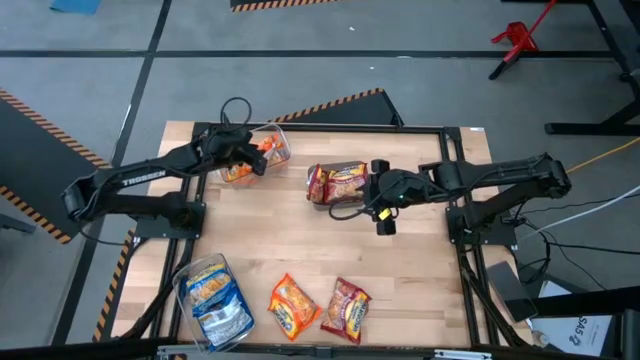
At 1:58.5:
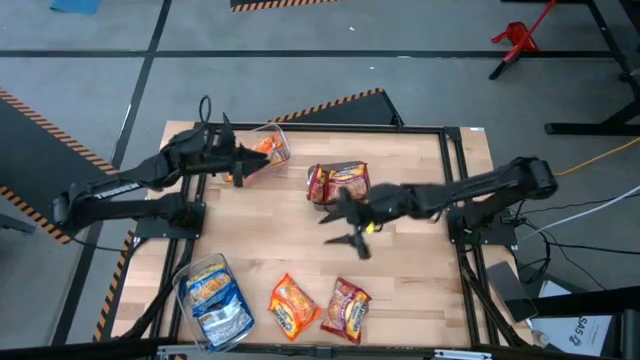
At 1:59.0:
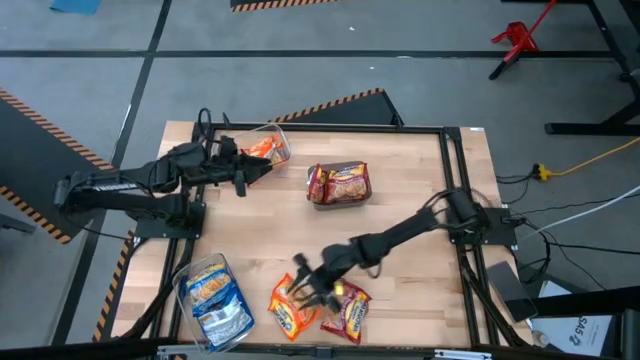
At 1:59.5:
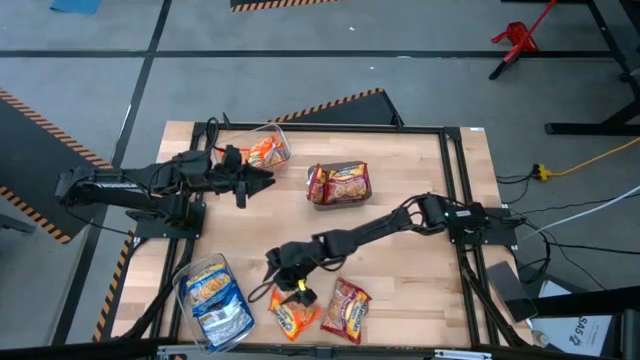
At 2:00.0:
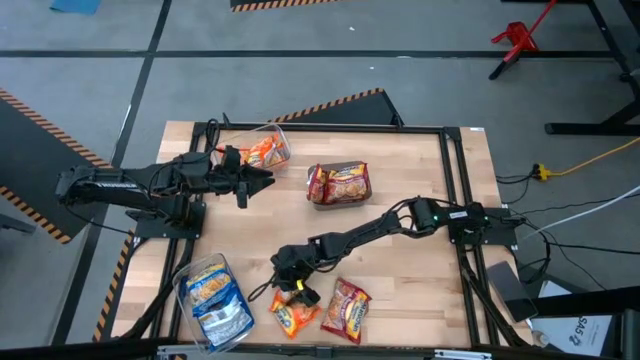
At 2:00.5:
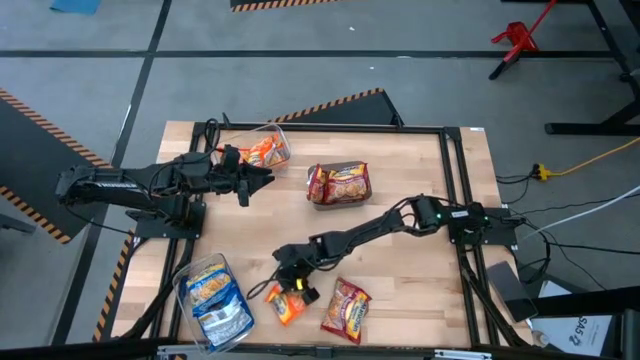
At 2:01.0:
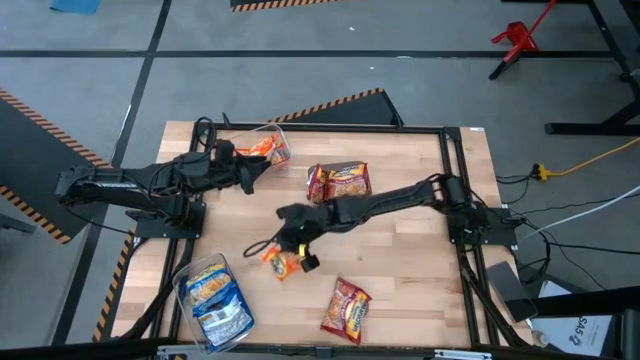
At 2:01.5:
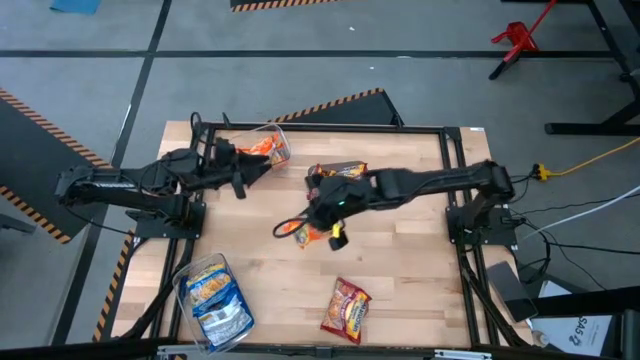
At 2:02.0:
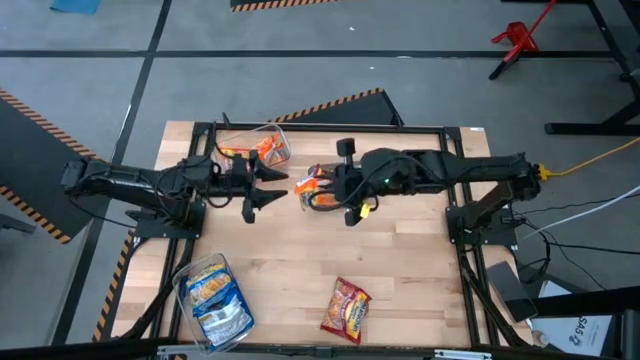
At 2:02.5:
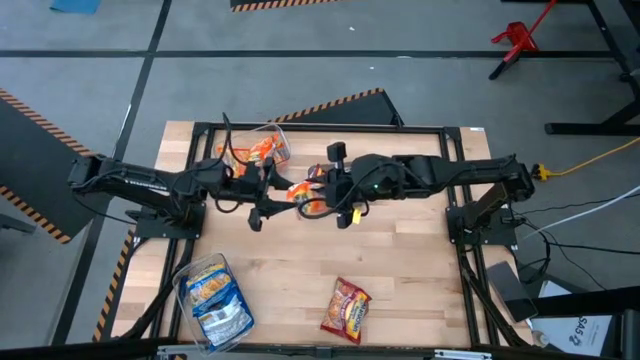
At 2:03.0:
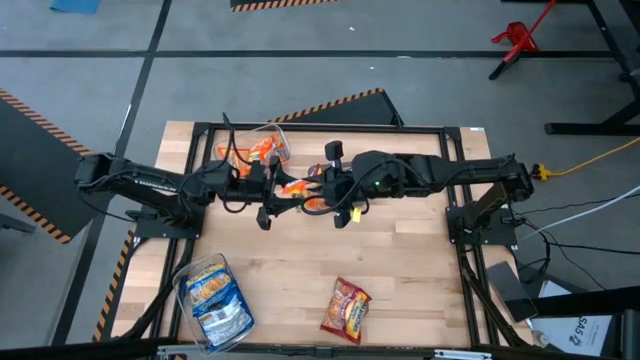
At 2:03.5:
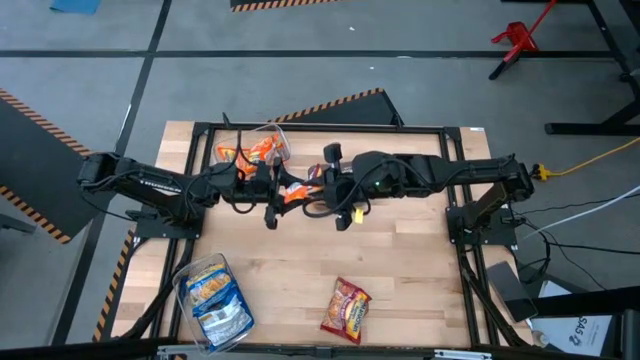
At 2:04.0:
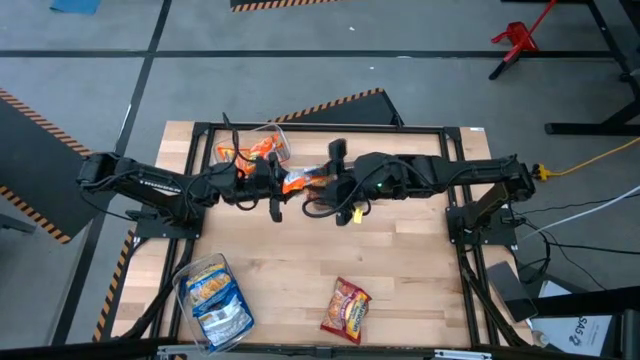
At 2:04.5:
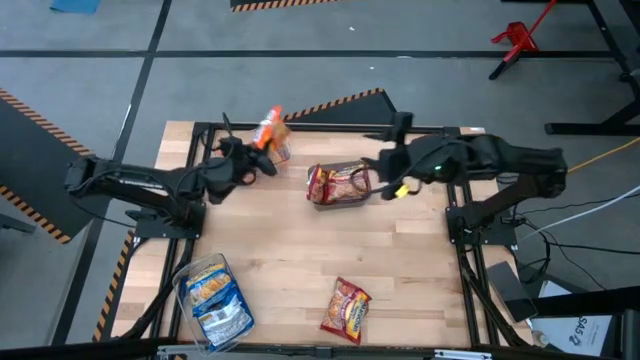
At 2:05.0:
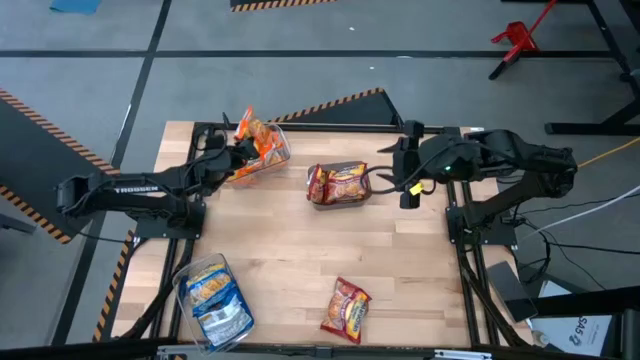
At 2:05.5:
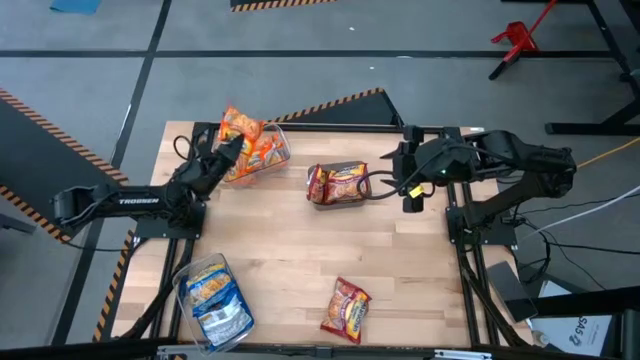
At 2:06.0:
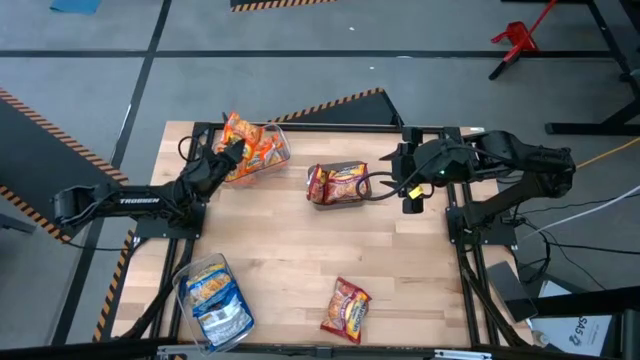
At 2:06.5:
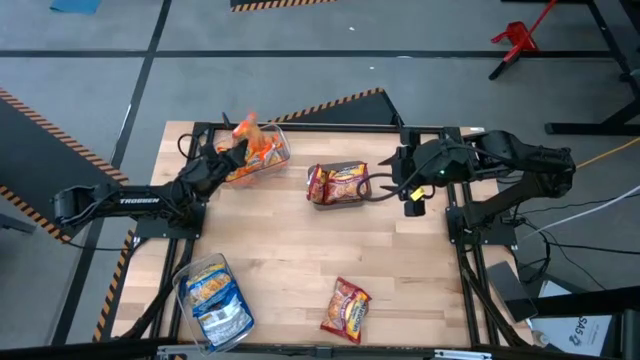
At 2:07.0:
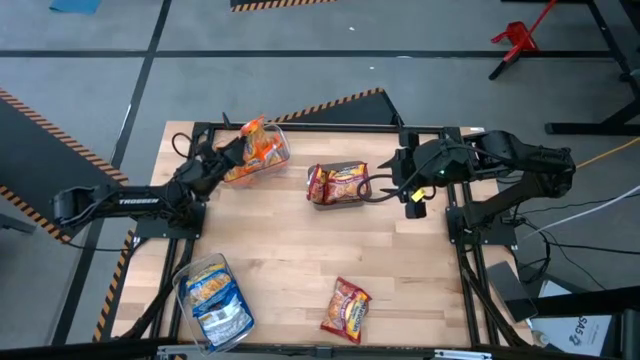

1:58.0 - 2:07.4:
Task: Sort Maruchan noodles
Put the orange noodle pack into the top transparent bin

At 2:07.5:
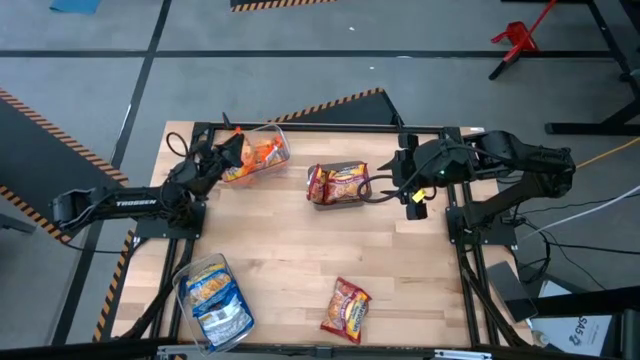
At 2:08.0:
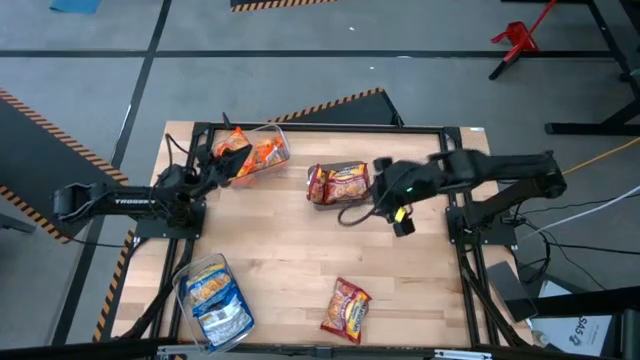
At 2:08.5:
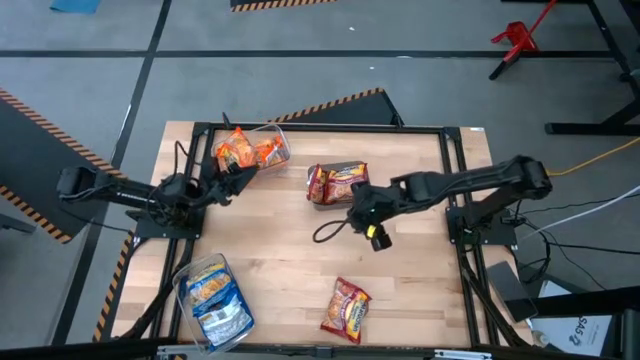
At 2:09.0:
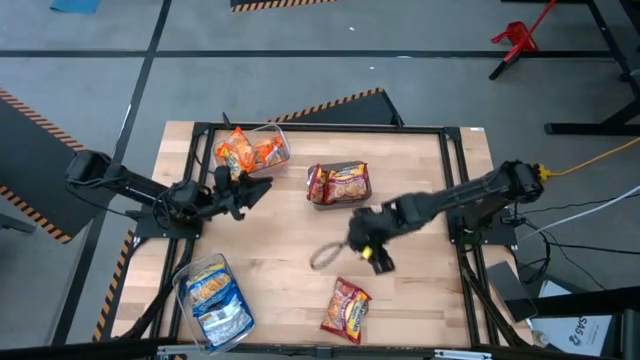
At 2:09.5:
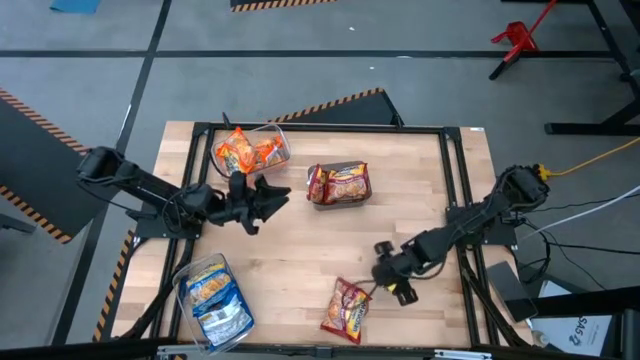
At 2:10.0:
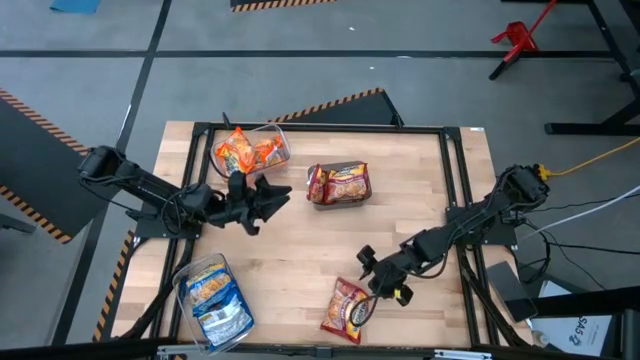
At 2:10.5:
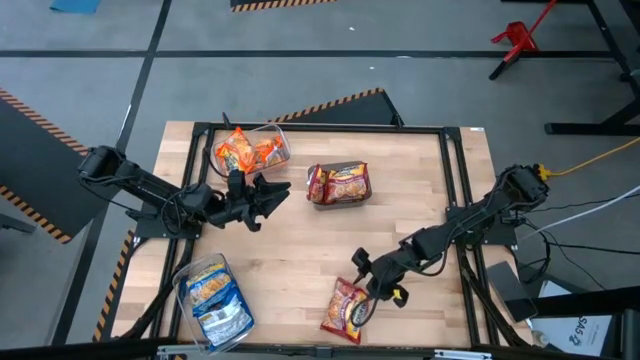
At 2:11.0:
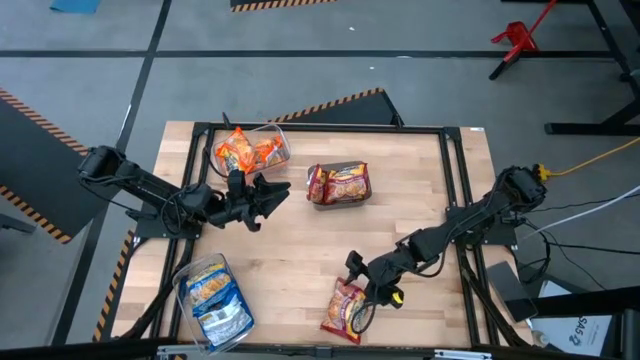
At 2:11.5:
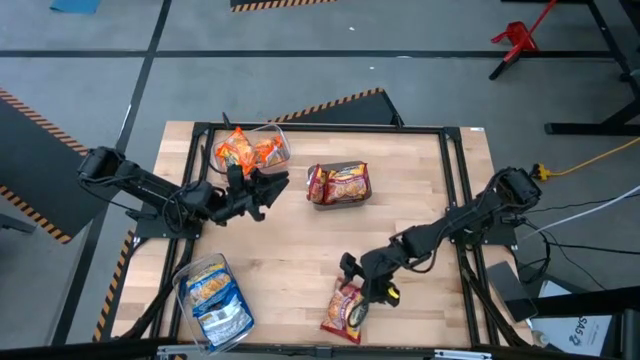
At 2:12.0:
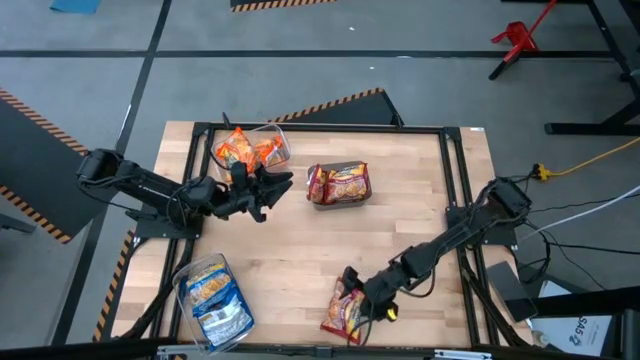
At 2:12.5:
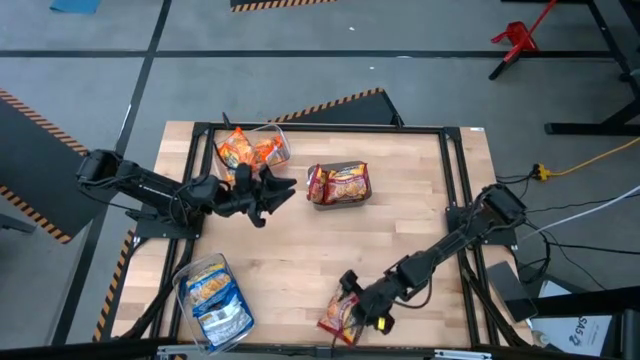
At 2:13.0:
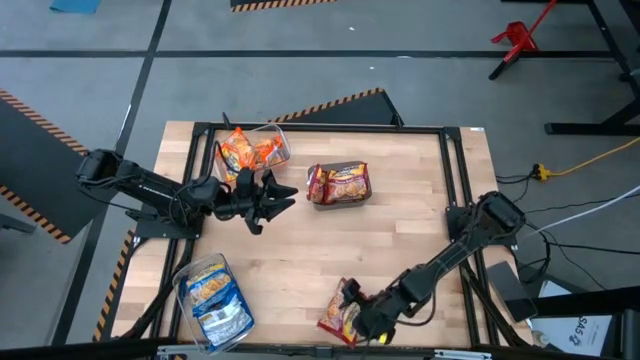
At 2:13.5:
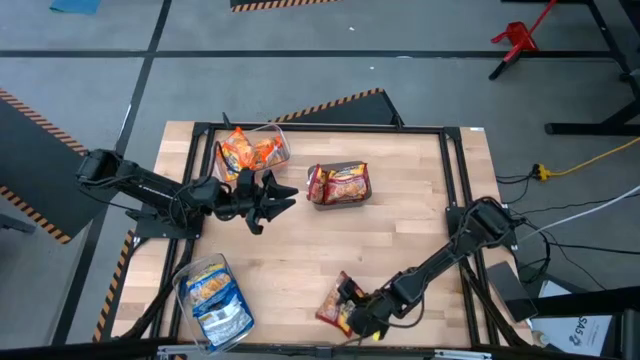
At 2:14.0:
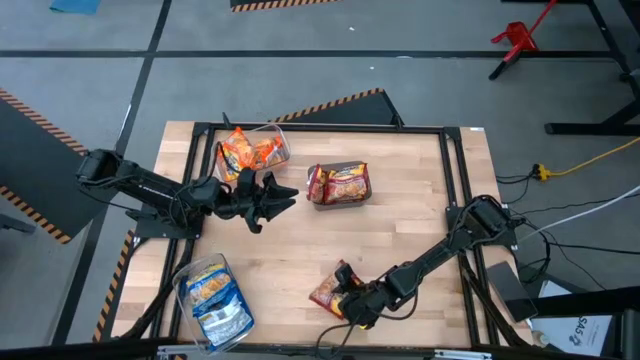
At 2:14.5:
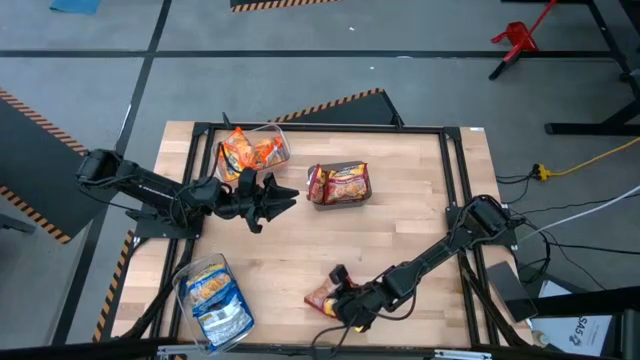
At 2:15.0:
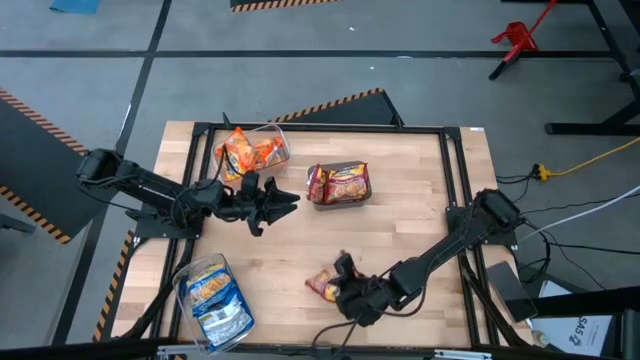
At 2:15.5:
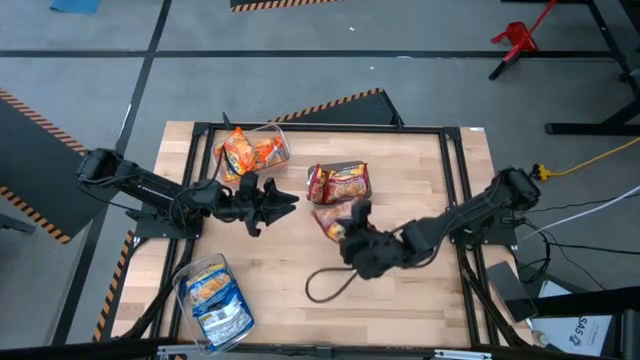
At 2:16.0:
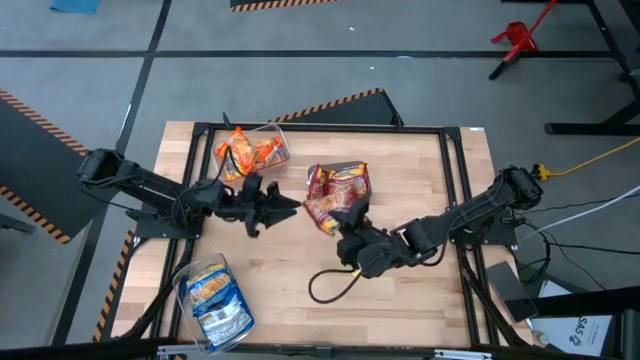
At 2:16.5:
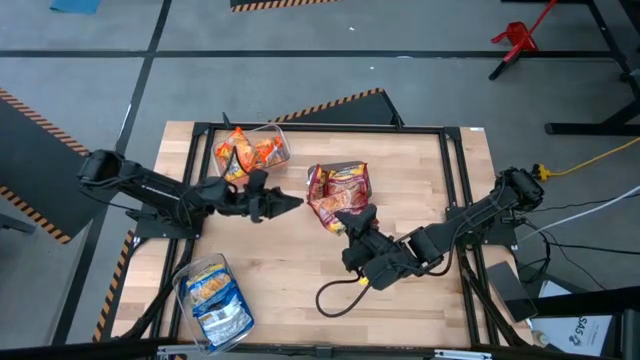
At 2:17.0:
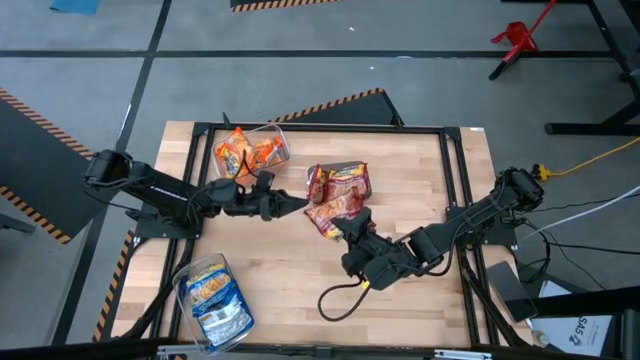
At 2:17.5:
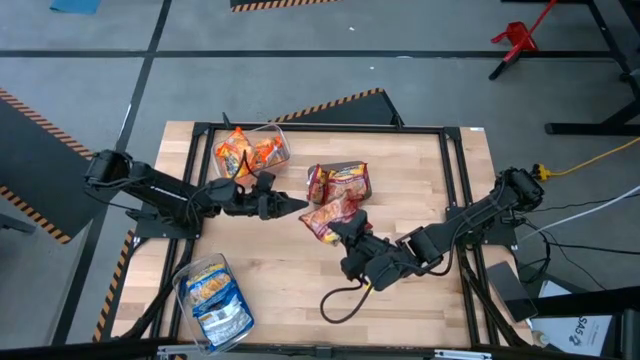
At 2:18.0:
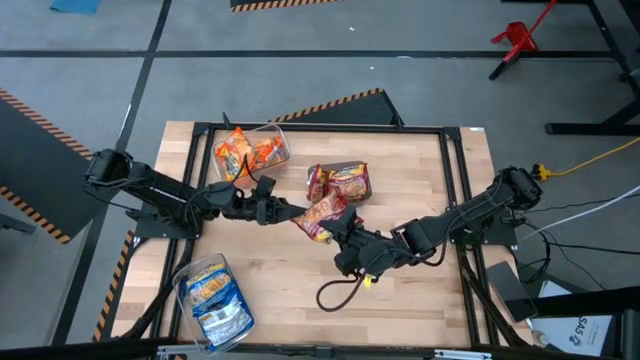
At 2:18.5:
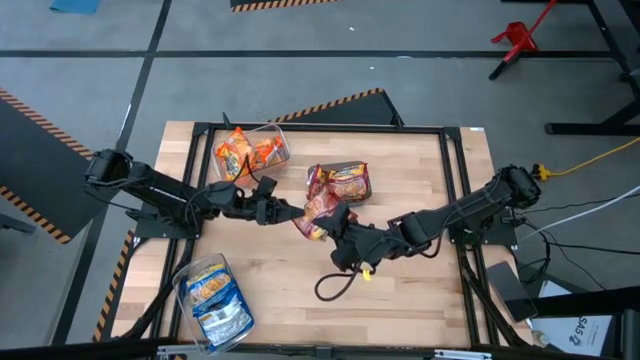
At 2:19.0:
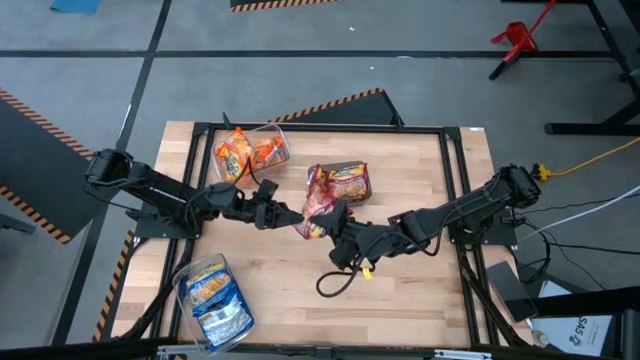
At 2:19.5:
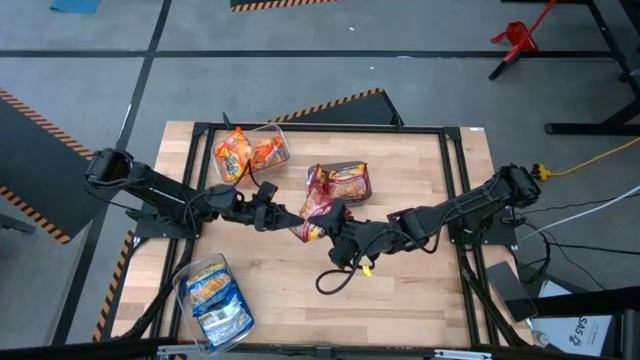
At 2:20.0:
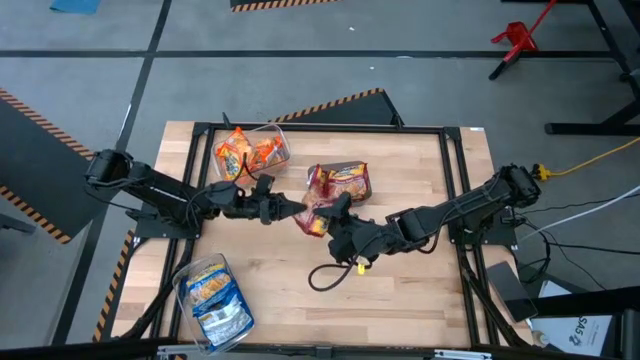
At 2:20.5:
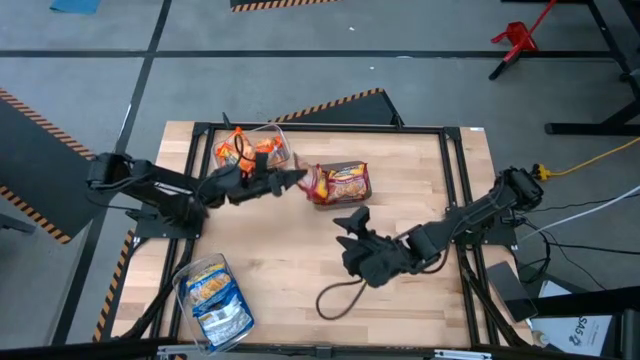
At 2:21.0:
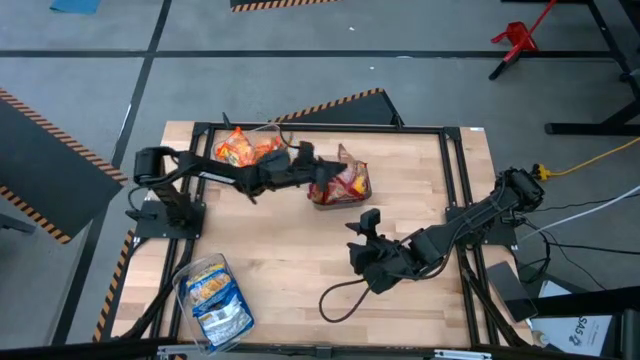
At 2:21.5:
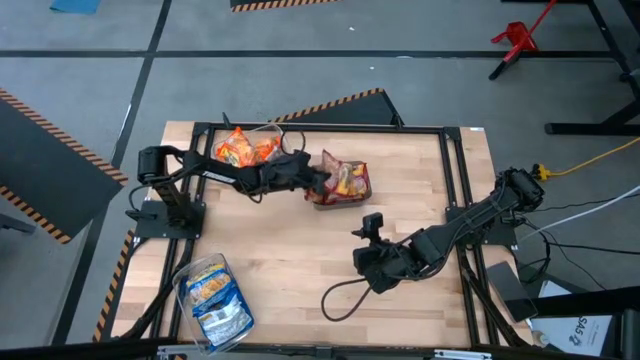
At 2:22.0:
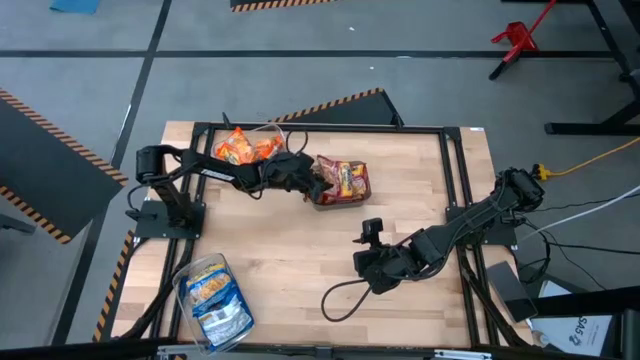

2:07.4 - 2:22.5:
Put the red noodle pack into the black bin
